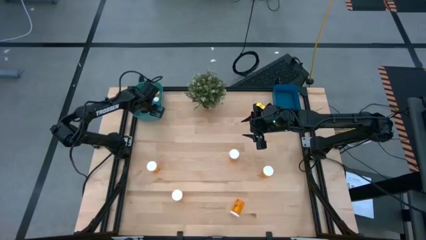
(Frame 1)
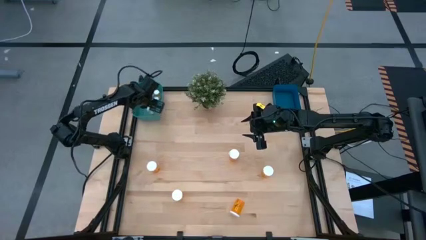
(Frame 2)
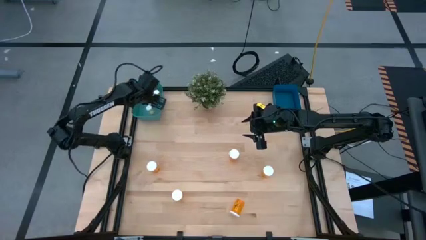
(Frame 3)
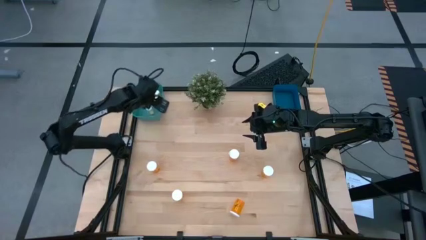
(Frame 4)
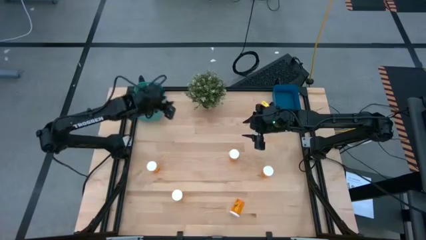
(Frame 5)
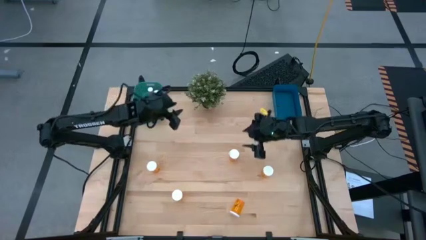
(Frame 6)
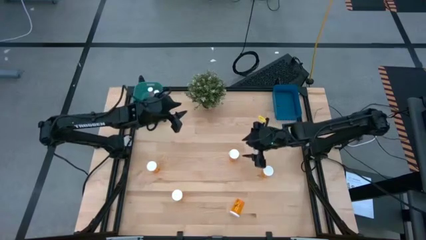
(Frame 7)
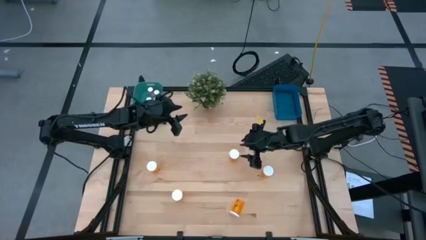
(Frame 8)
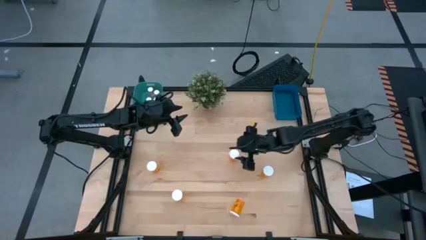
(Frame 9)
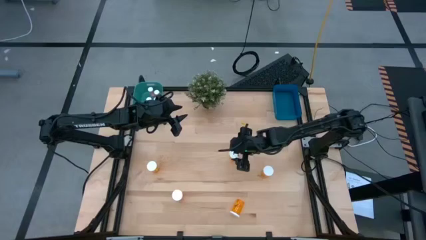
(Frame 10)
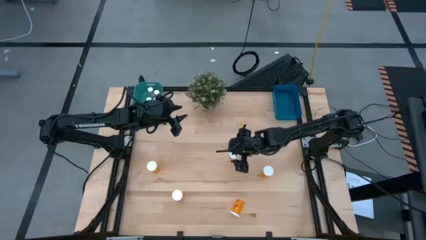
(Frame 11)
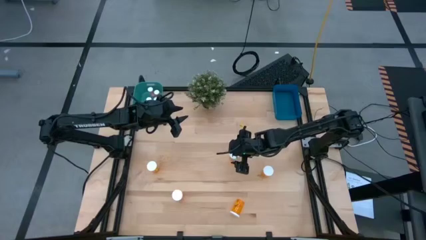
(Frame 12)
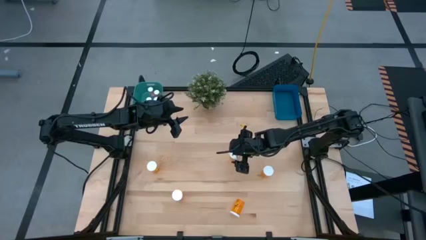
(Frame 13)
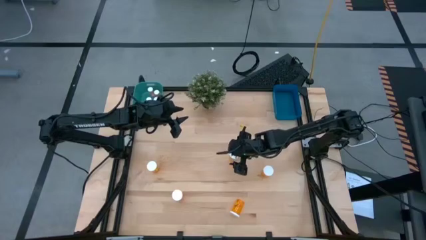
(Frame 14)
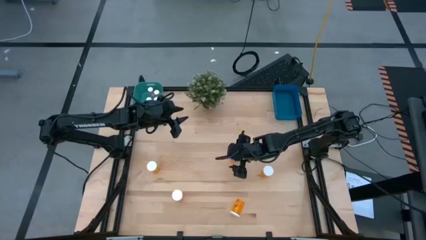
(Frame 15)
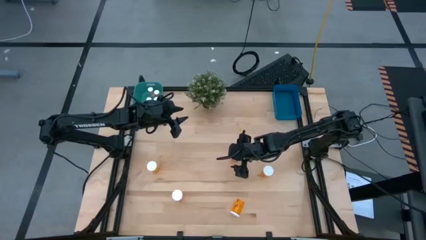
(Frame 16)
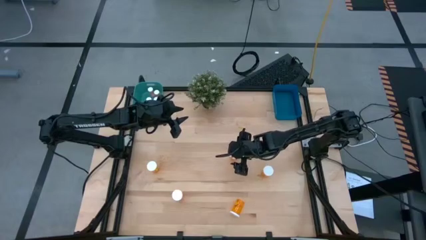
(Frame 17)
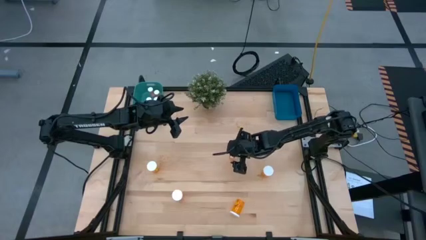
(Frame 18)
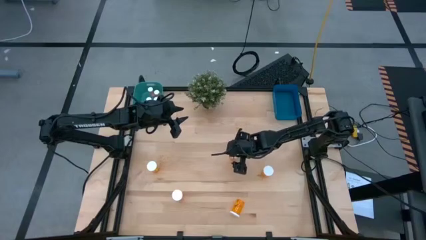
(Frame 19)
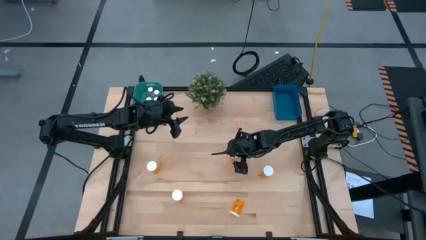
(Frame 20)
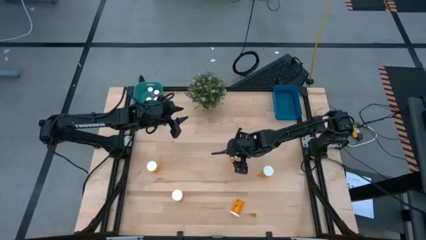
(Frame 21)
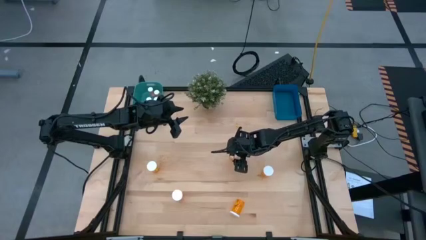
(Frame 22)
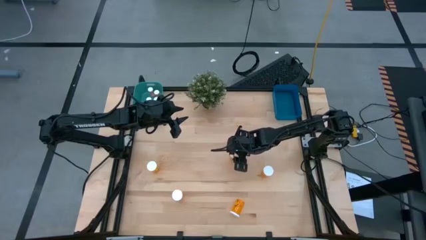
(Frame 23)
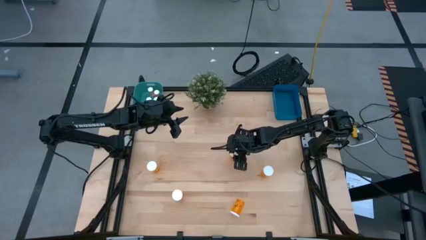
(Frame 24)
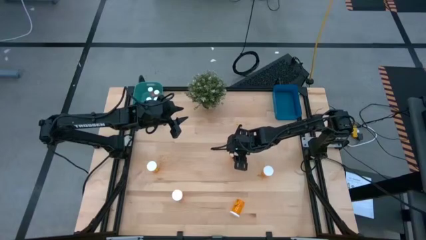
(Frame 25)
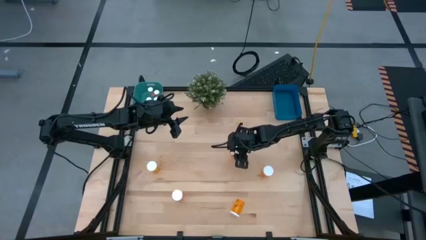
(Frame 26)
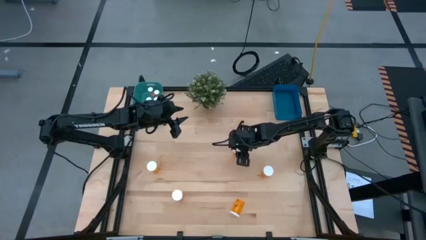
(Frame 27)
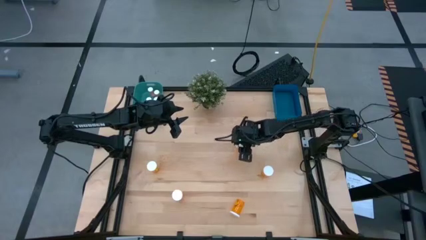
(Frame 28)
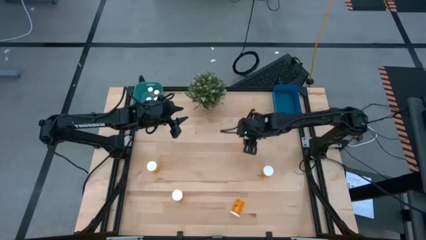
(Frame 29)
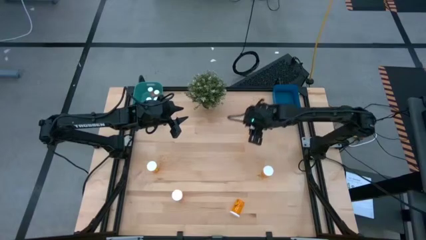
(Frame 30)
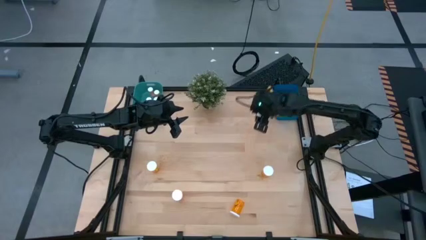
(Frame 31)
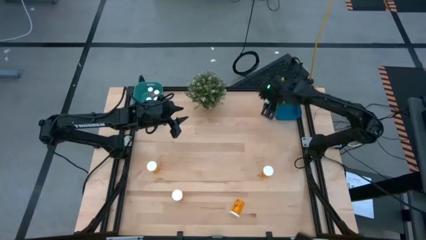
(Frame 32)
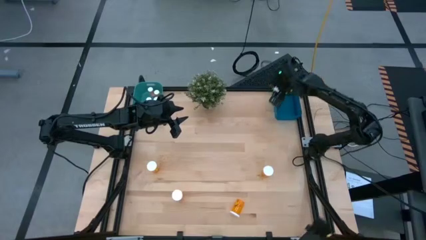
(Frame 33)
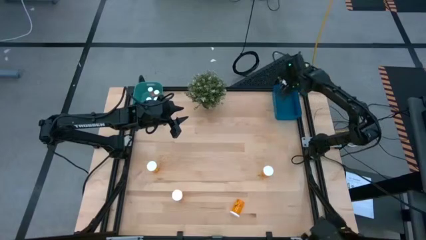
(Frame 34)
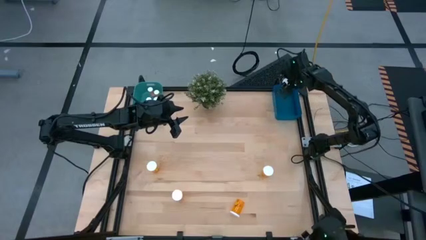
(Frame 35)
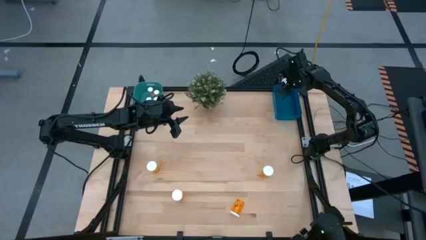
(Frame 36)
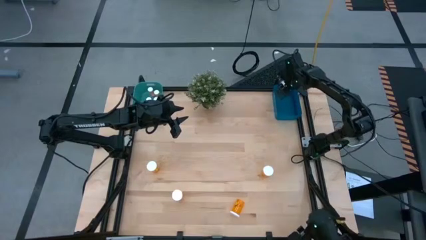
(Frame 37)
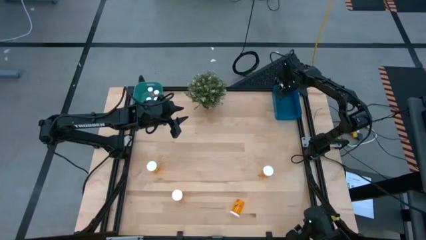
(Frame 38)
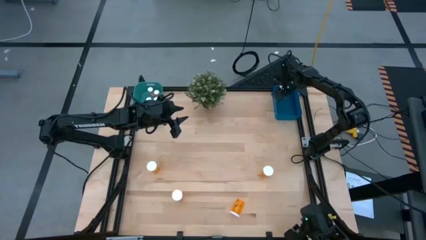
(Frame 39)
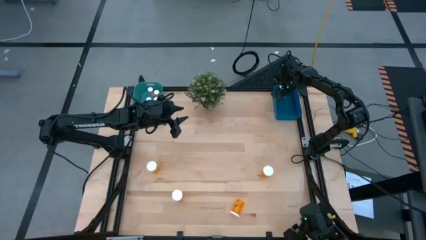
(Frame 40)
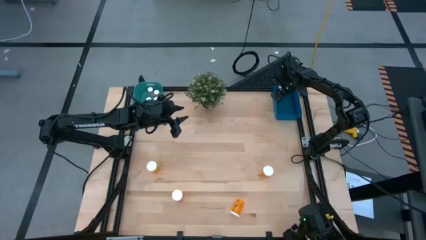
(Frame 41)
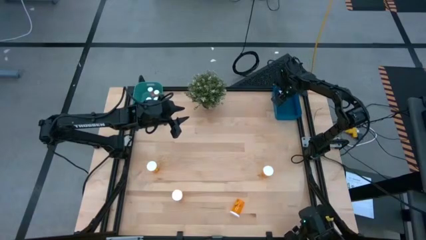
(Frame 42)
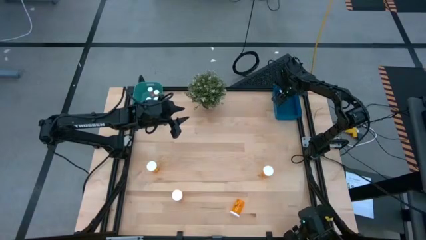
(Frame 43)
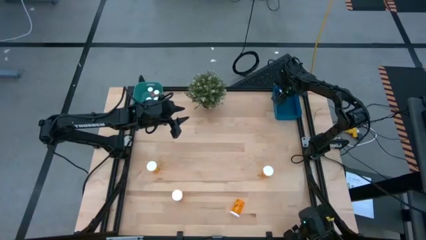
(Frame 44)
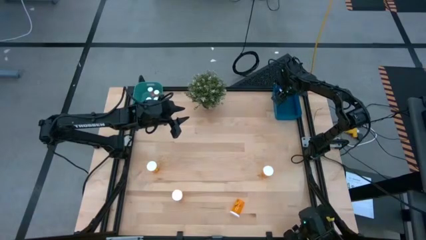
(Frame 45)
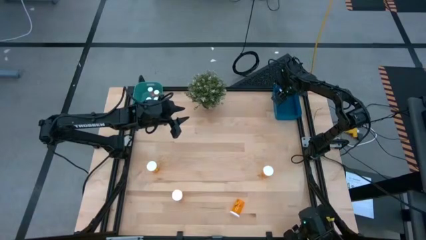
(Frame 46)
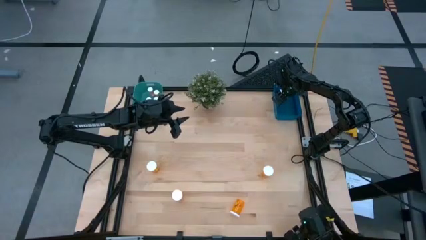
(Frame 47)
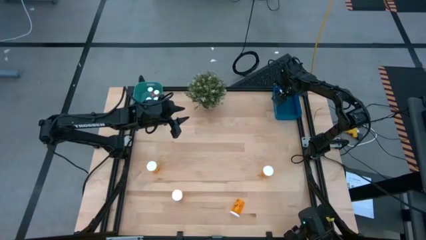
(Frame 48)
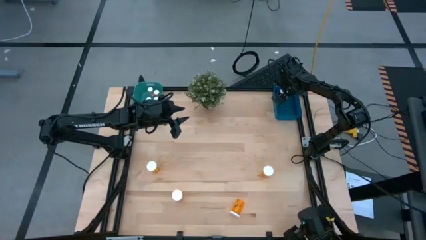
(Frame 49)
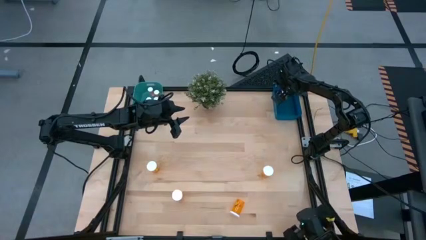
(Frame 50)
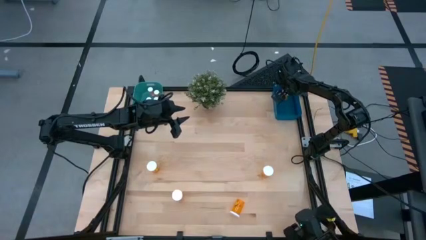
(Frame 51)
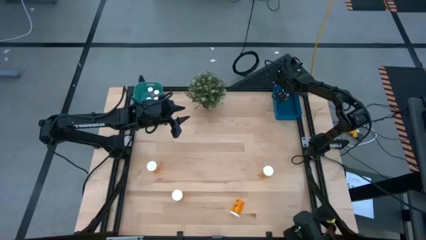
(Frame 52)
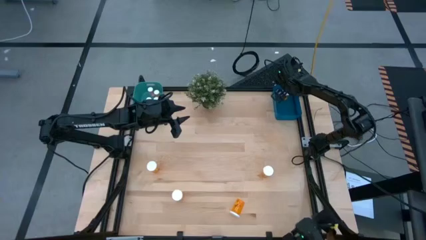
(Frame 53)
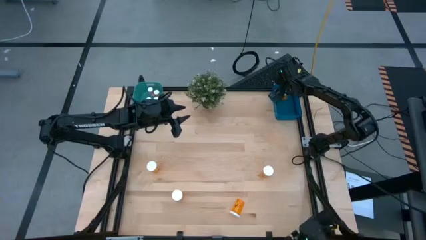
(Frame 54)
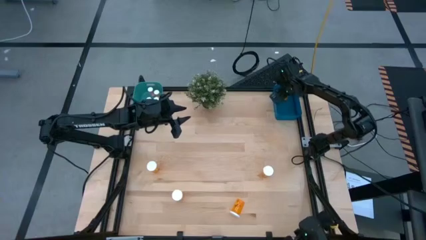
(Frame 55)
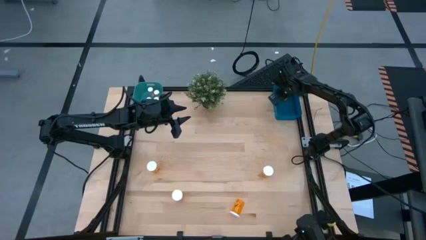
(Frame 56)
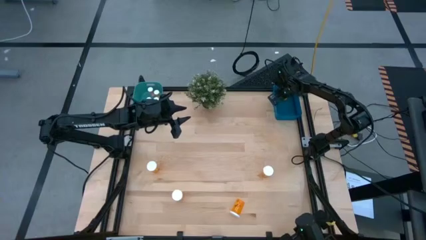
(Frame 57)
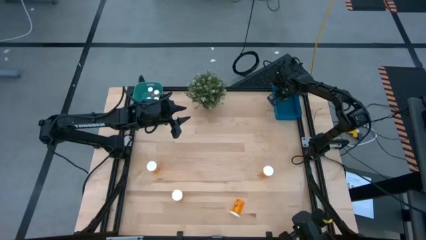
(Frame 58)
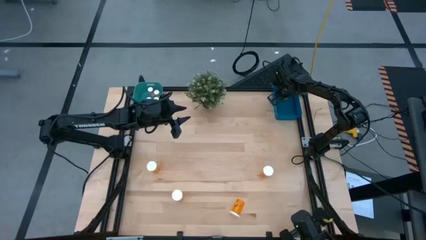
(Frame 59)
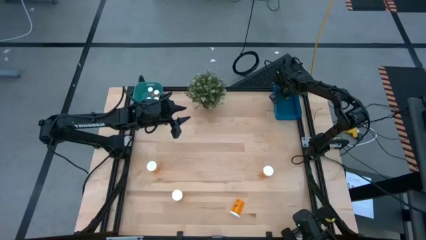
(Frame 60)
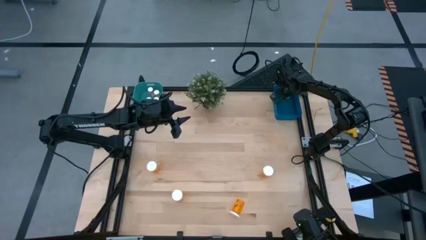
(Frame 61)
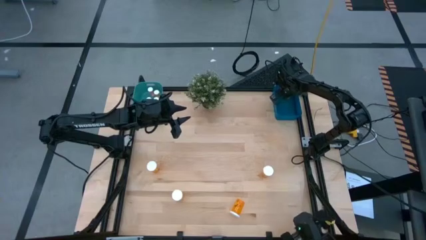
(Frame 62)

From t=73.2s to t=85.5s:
Task: Pick and place medicine bottles into bin by pill shape (circle, oval)
Put the big orange pill bottle into the blue bin

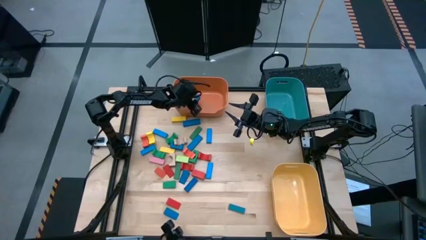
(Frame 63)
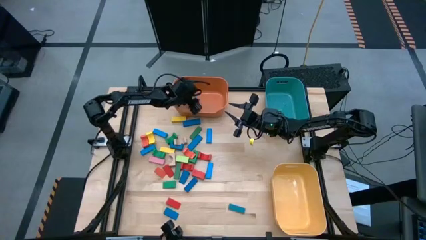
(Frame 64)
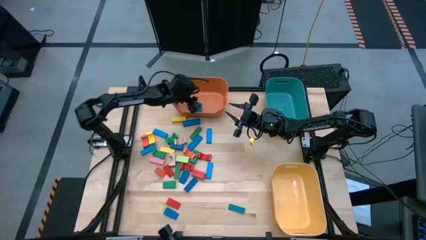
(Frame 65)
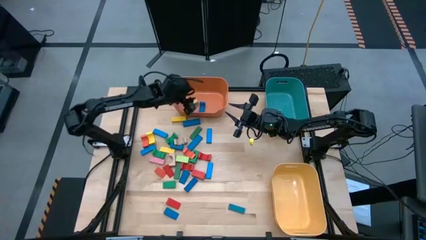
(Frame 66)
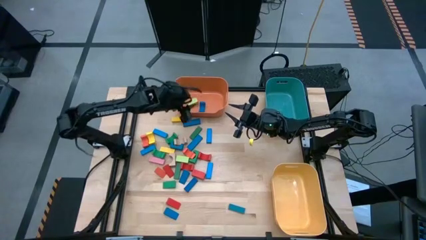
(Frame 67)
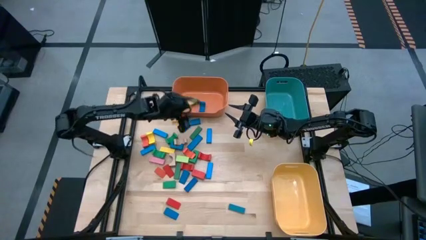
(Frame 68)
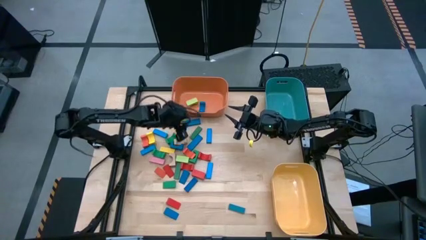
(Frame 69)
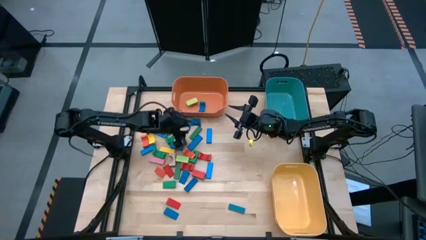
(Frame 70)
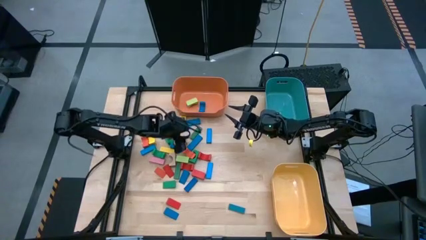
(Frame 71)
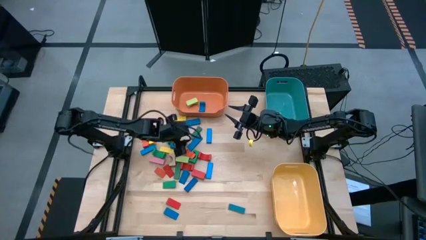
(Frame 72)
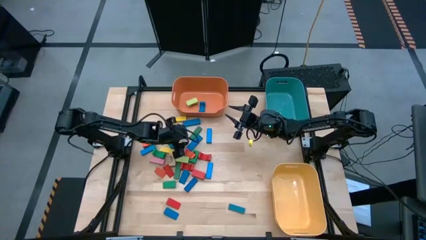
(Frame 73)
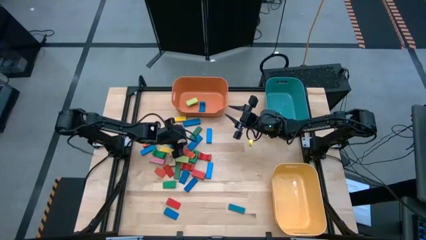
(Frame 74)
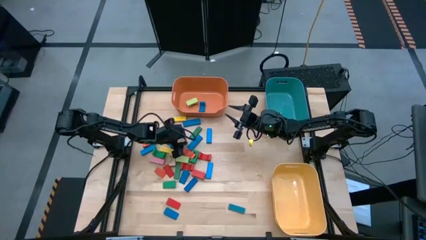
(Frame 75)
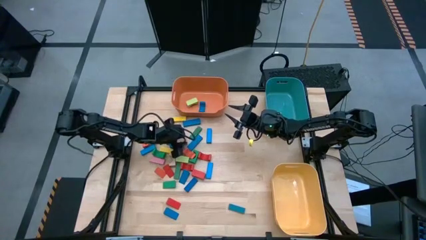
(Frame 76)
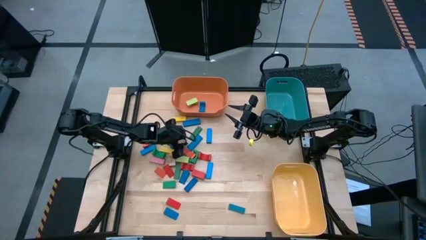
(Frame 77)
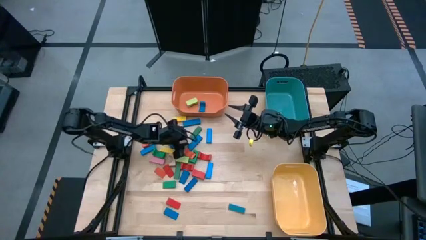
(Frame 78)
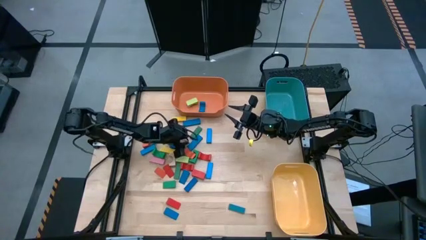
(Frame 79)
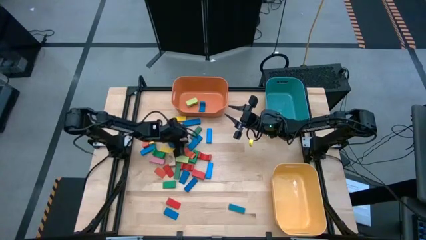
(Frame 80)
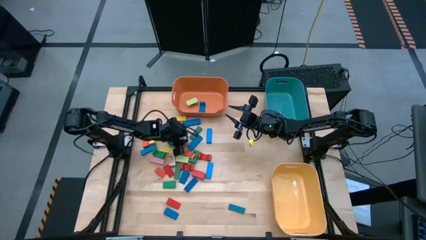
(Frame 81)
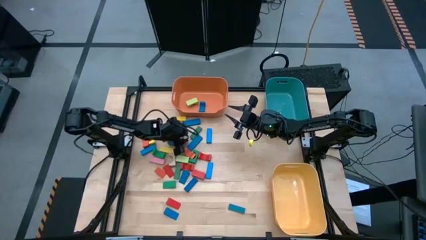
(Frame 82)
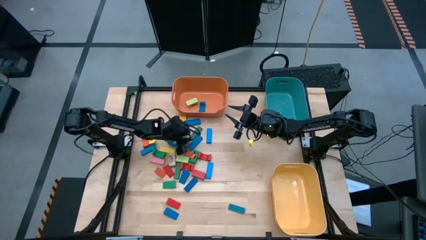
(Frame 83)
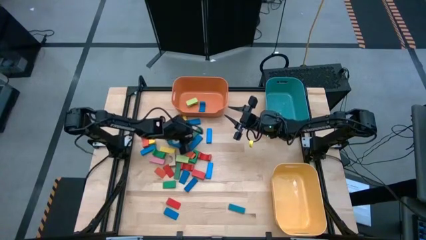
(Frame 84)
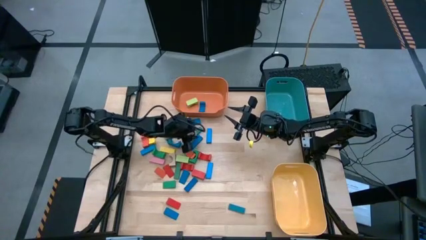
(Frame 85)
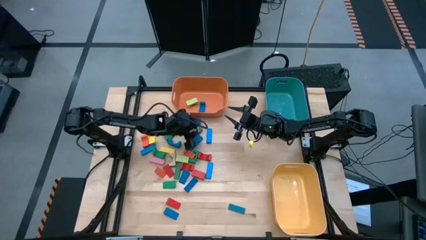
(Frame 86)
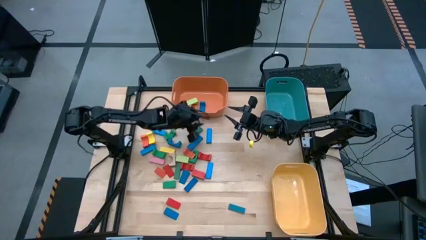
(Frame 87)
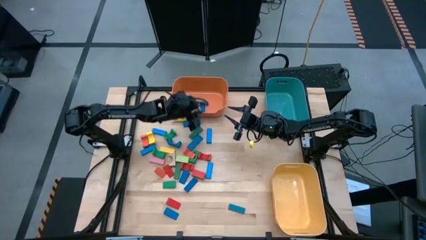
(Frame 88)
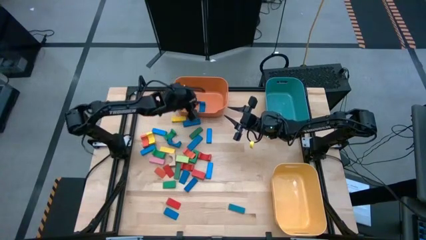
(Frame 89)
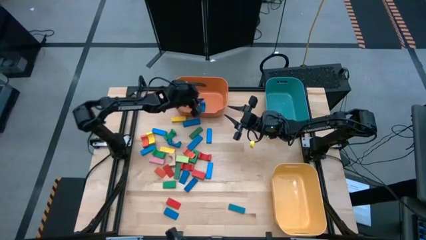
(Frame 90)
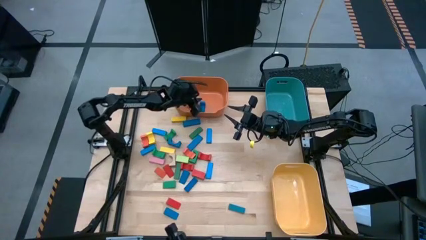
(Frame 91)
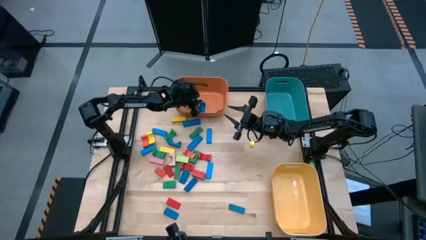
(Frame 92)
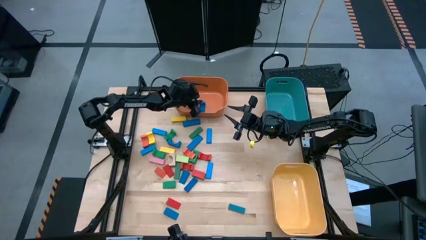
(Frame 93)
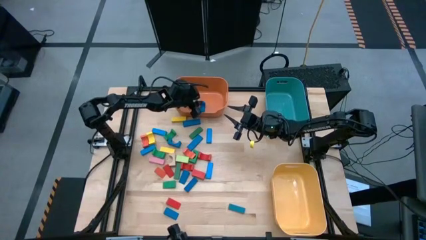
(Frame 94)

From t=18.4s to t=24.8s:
Task: Sort blocks by size
Put the brown arch block into the orange bin
